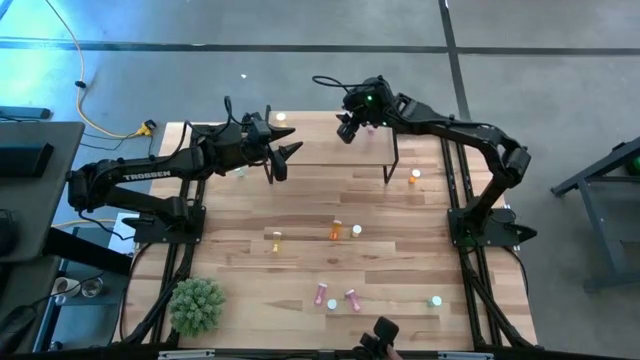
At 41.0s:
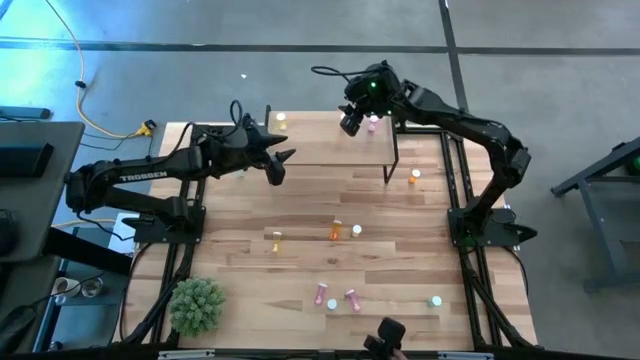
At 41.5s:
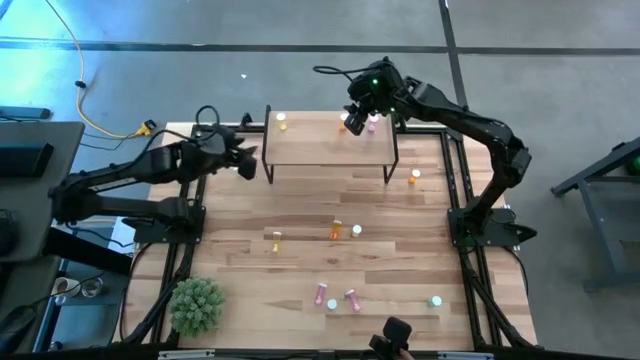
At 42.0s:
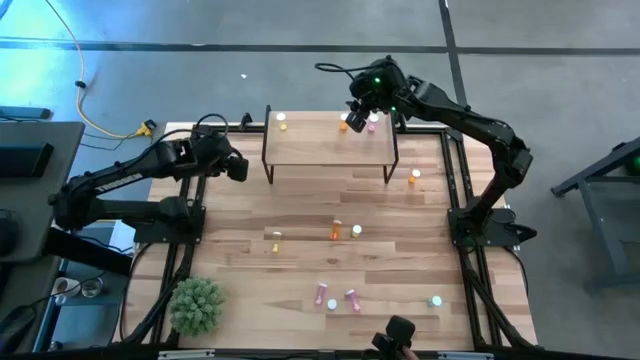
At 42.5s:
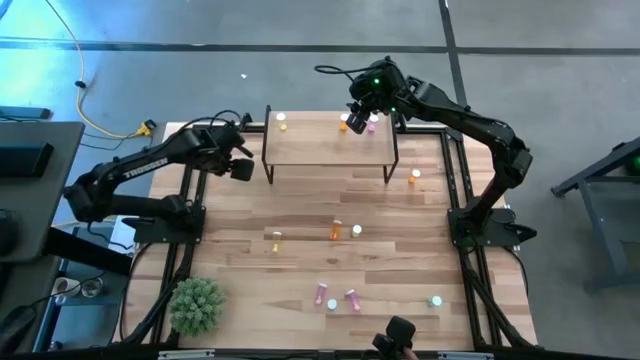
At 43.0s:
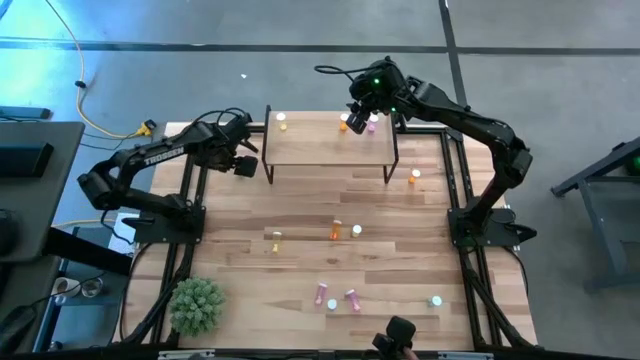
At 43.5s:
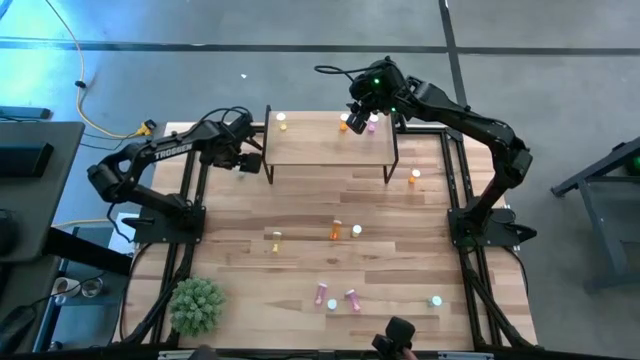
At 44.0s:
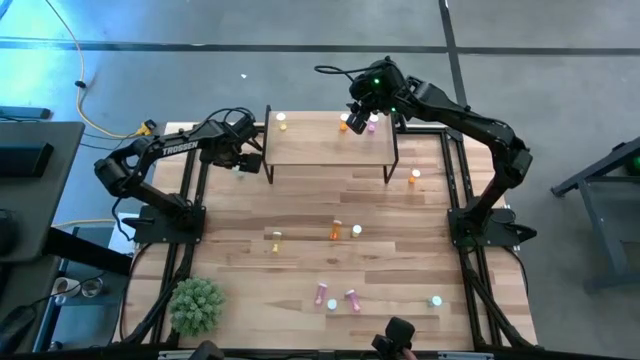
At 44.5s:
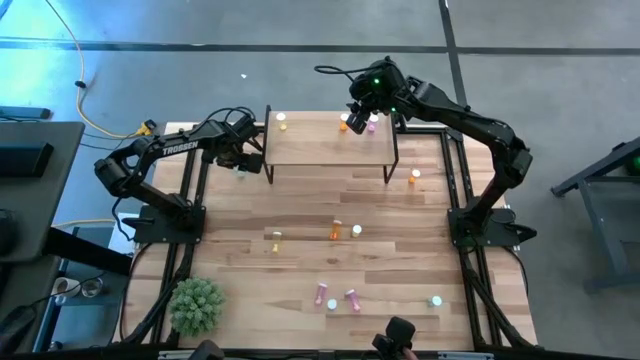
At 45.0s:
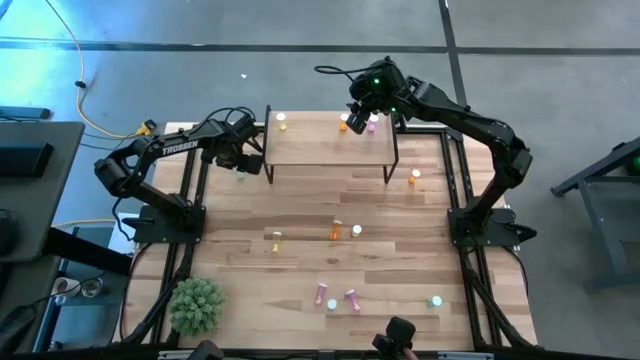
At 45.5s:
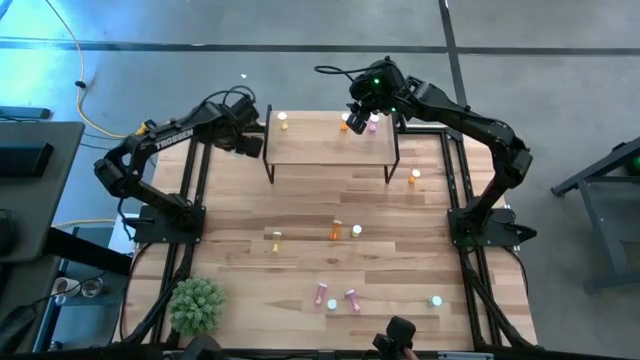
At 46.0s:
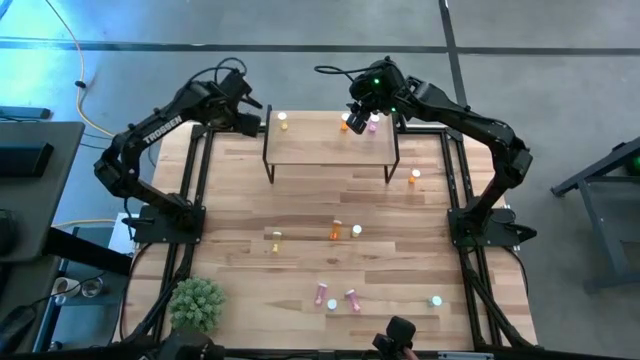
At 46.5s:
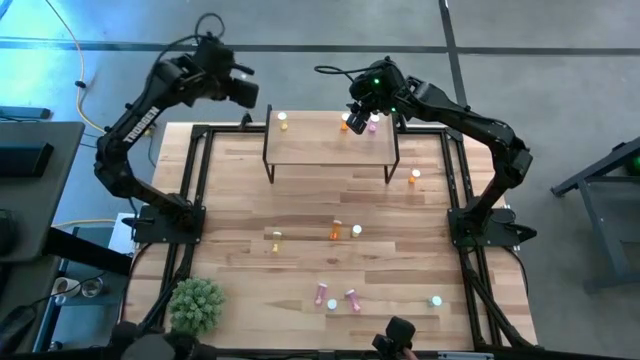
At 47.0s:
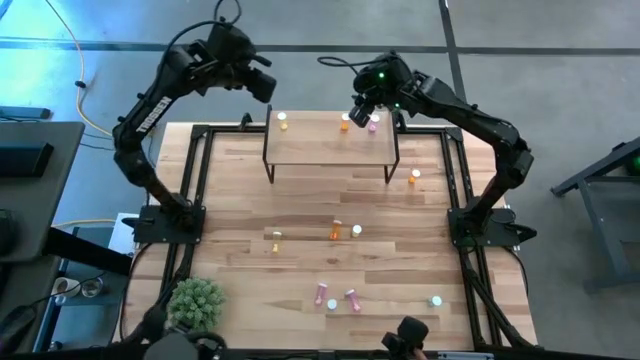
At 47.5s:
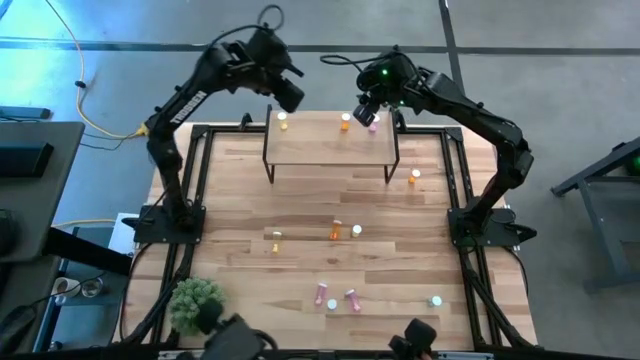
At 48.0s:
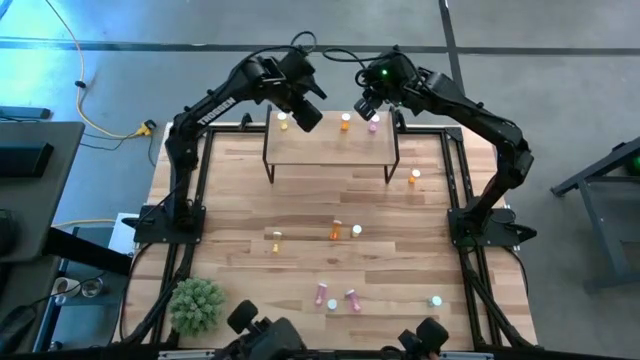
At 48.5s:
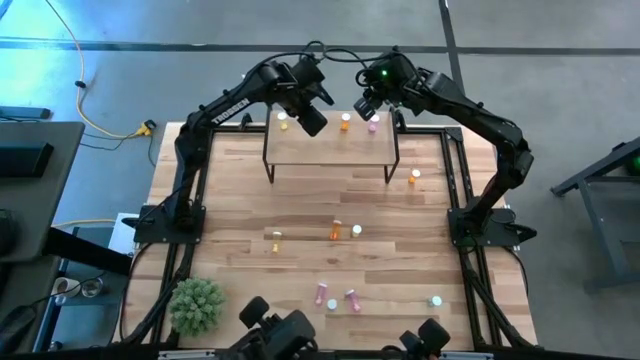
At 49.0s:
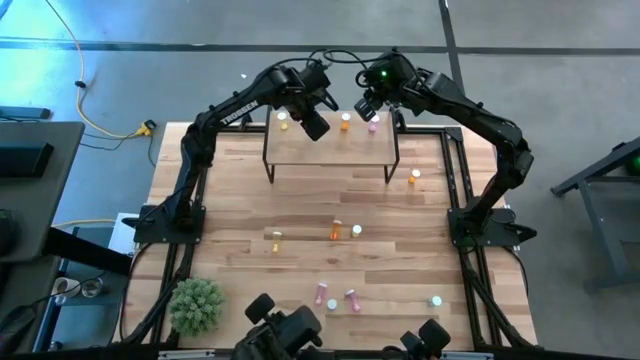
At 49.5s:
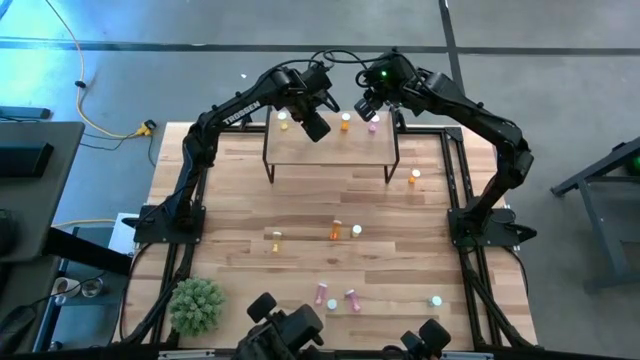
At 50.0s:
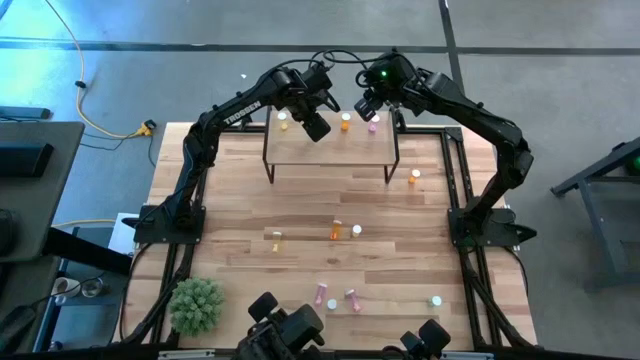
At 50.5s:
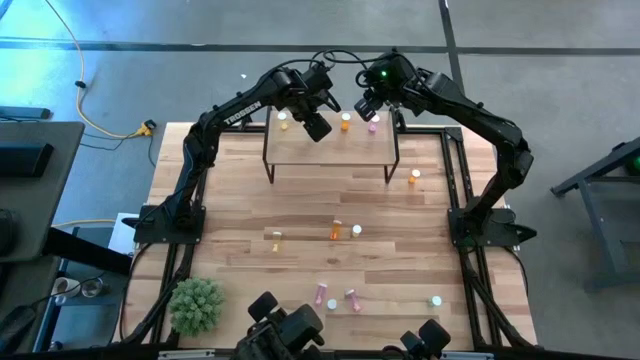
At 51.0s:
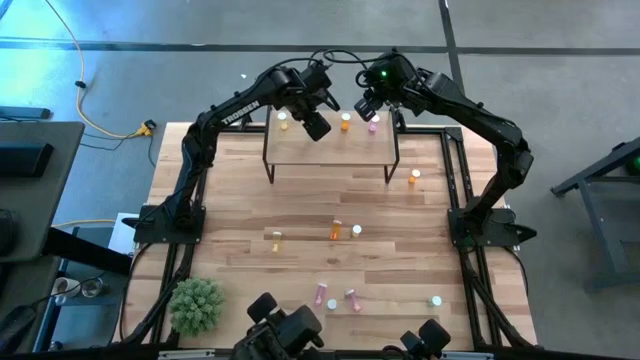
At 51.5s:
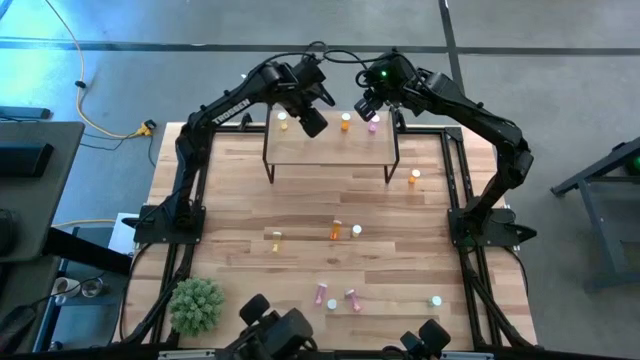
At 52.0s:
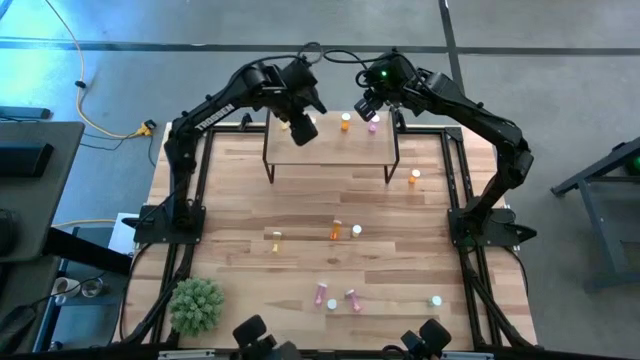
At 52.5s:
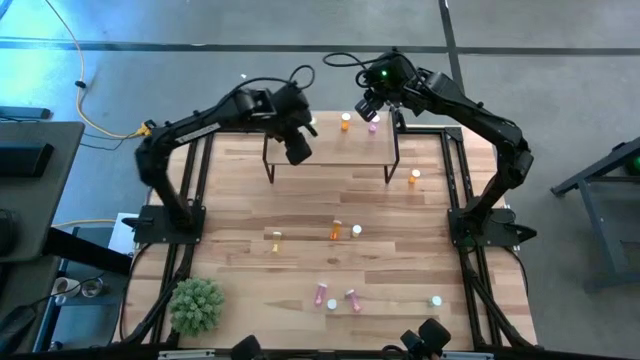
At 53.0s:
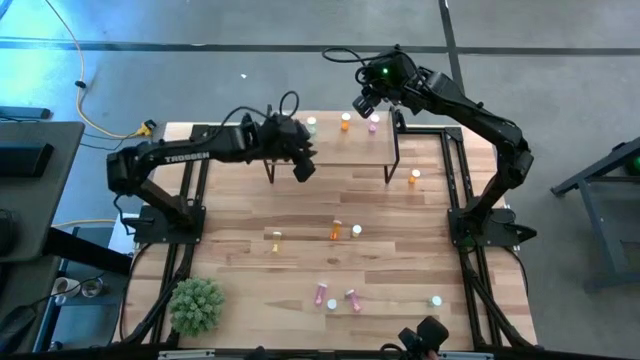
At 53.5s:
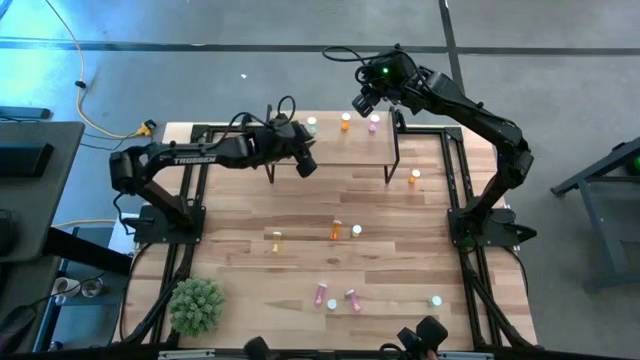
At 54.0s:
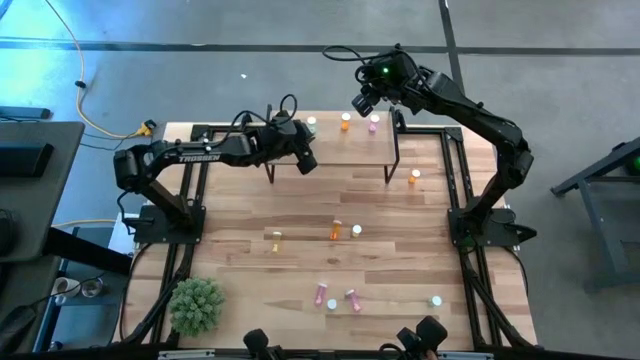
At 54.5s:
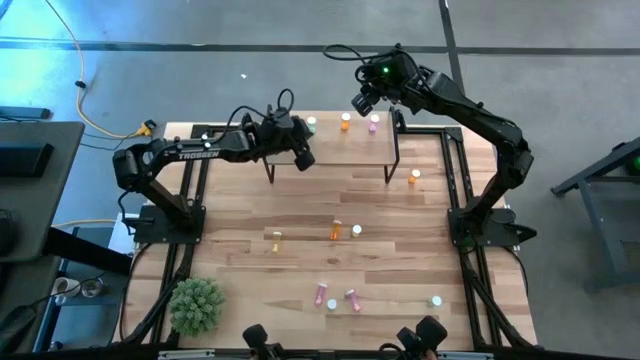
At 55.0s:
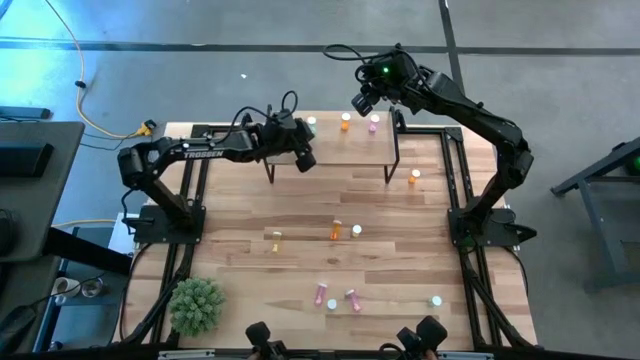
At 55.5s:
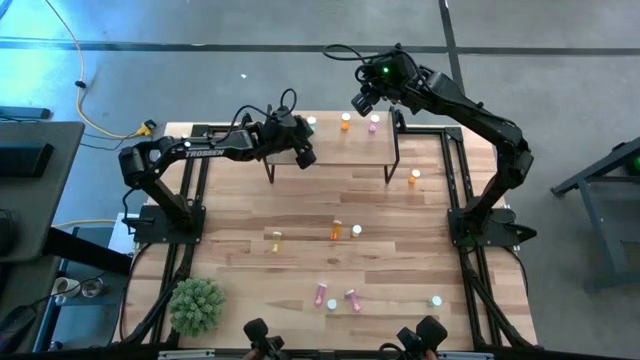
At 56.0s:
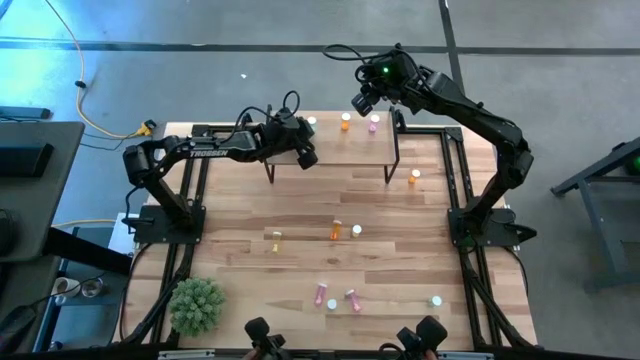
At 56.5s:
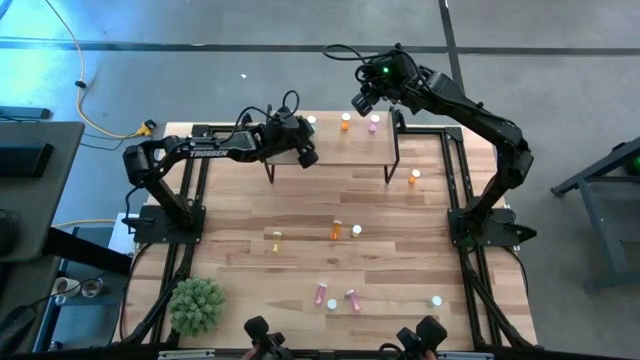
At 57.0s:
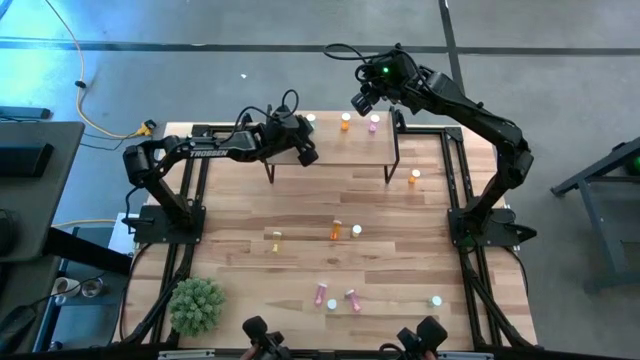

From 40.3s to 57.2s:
Task: Pick and place medicine bottles onto shelf by color
Put the top blue pill bottle on the shelf

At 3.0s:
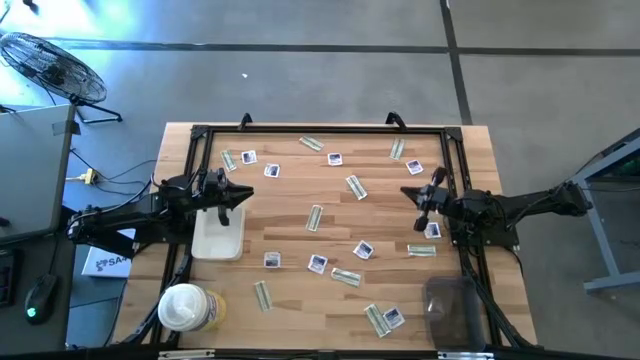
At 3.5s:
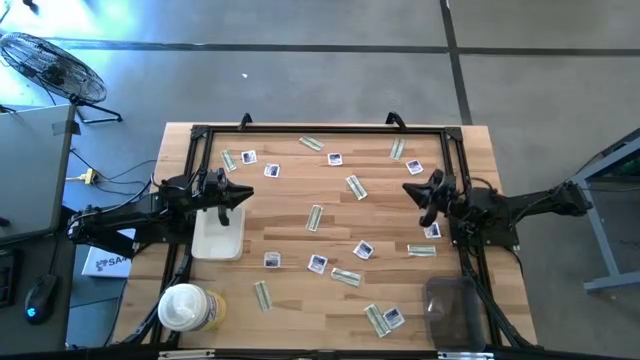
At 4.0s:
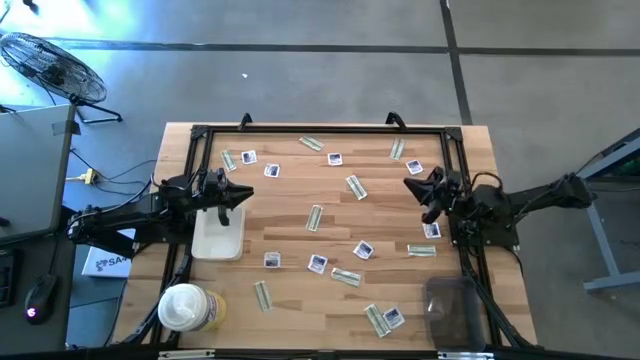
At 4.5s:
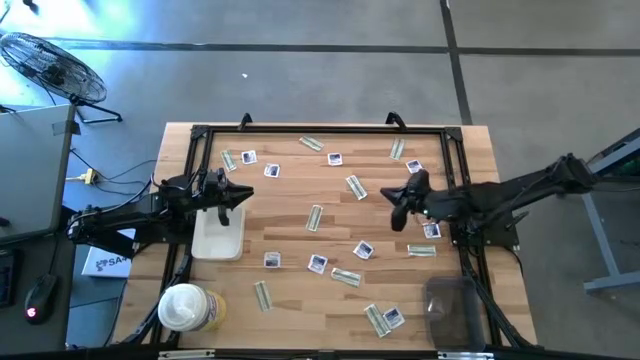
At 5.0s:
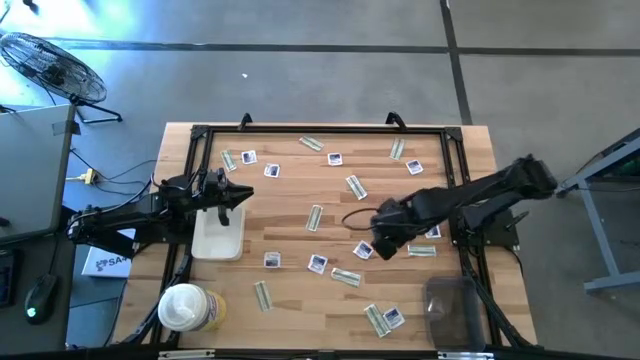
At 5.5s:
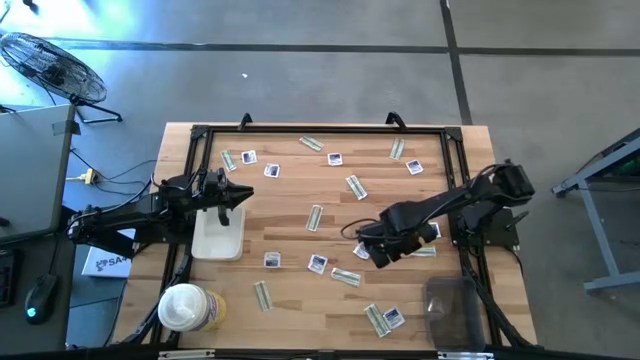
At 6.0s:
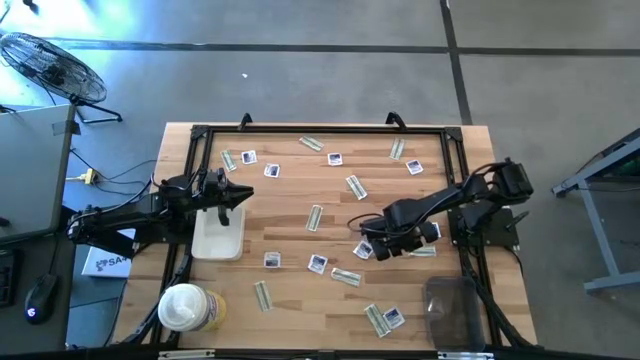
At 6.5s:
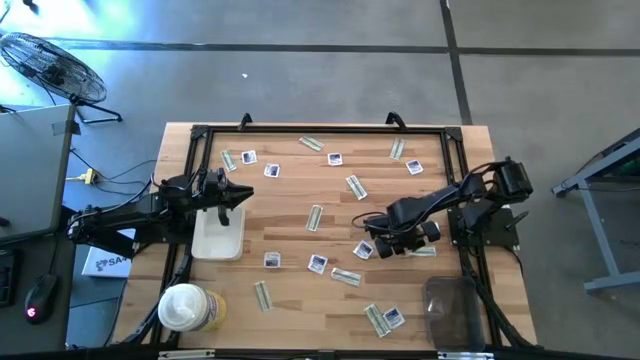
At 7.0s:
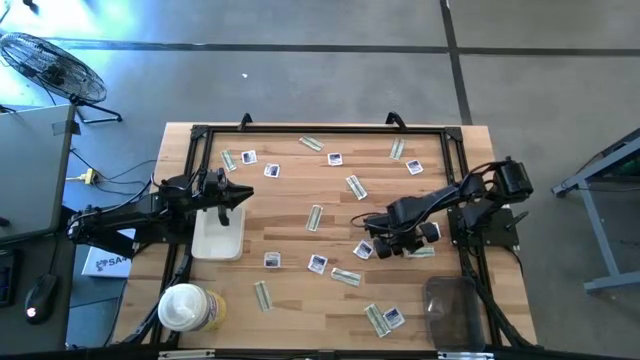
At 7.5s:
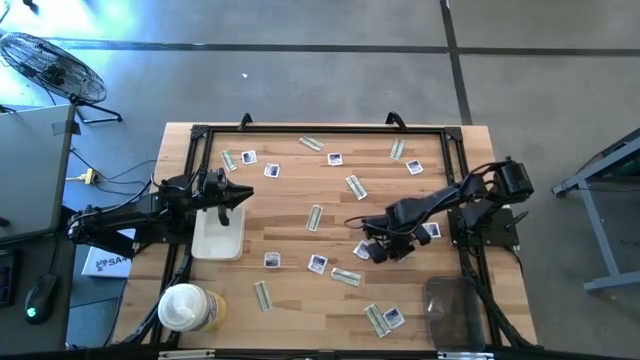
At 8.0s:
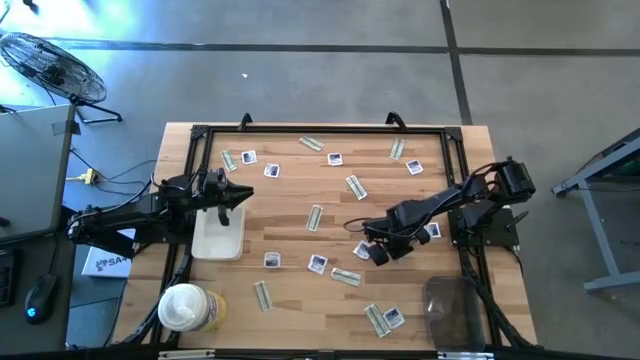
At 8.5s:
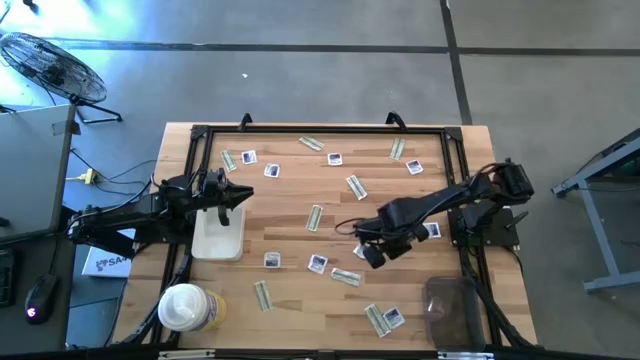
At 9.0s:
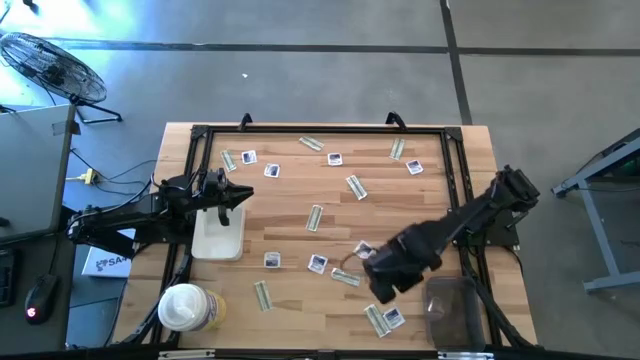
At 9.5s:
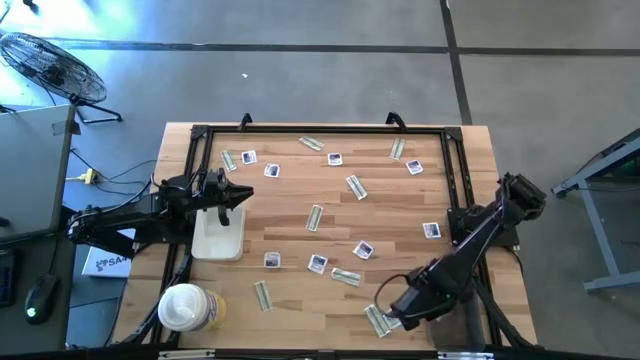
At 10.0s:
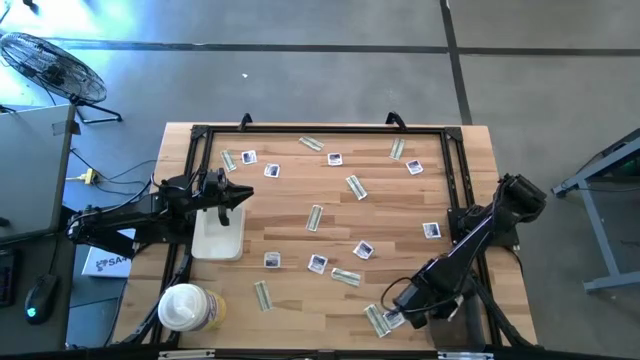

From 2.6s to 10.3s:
Task: Pick & Place First Aid Supplies
Put the green bandage pack into the black bin
